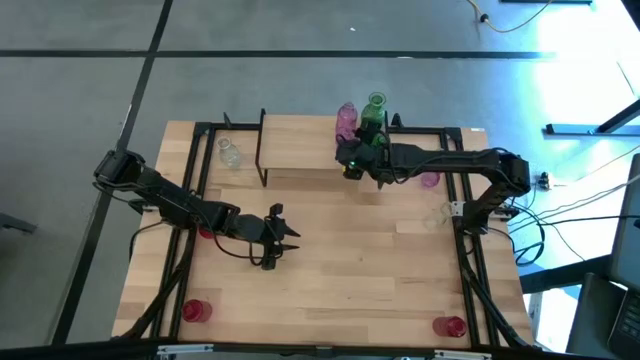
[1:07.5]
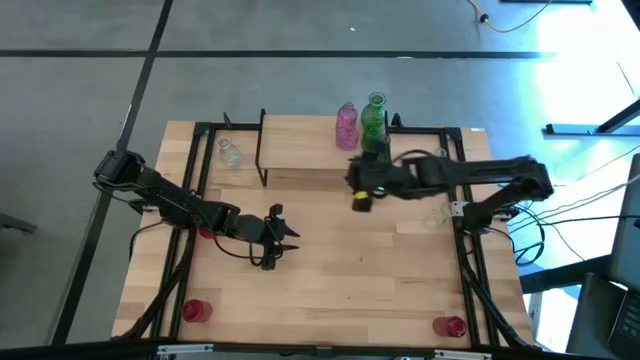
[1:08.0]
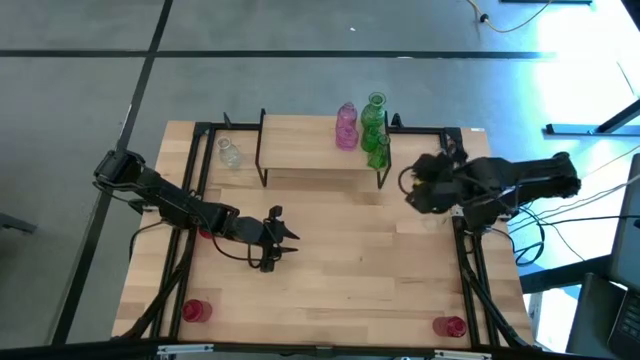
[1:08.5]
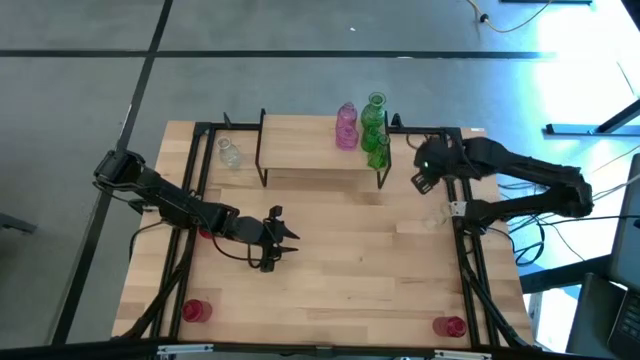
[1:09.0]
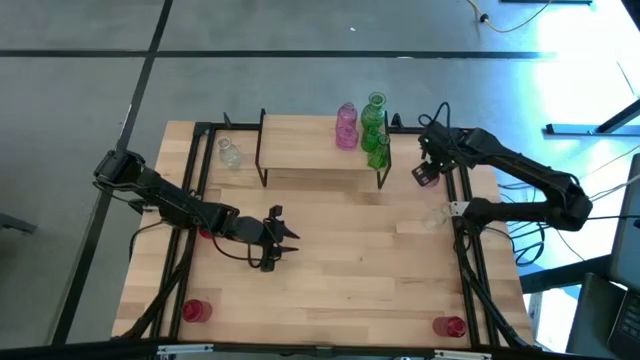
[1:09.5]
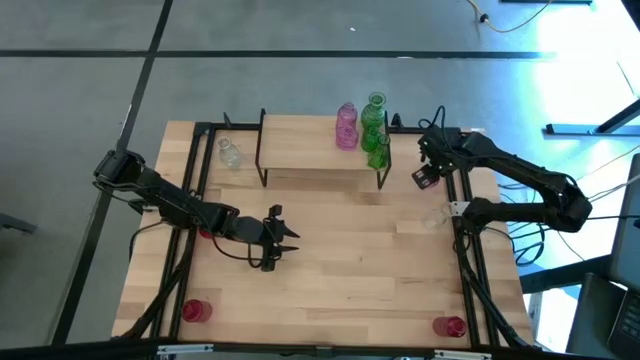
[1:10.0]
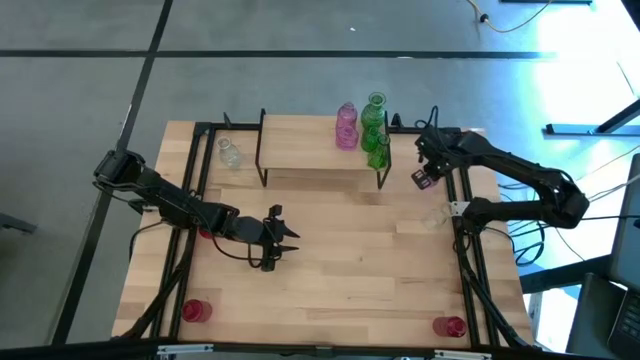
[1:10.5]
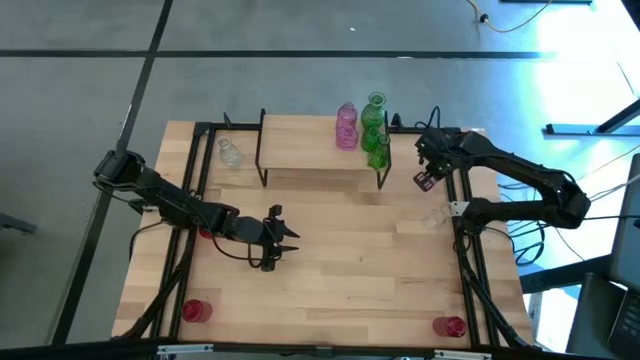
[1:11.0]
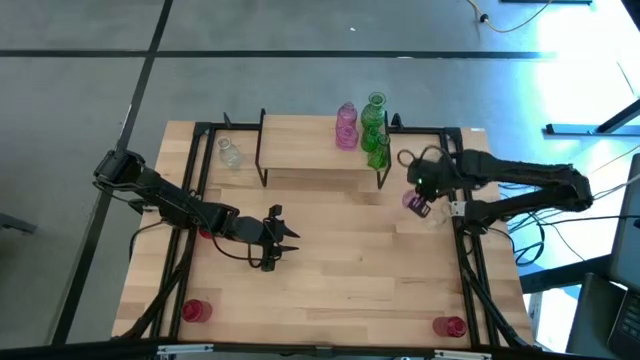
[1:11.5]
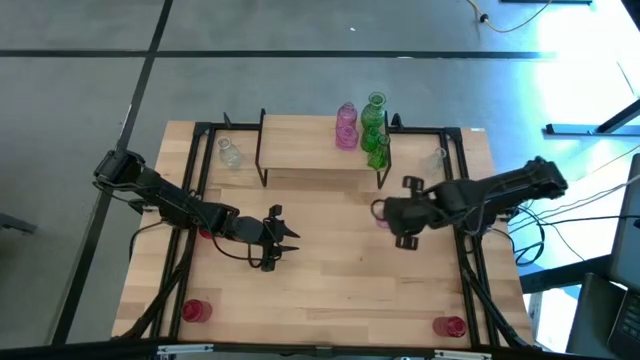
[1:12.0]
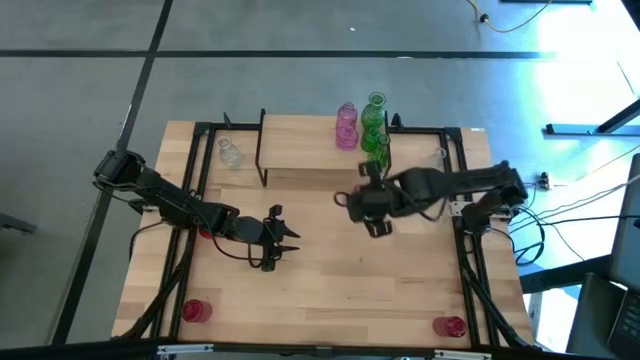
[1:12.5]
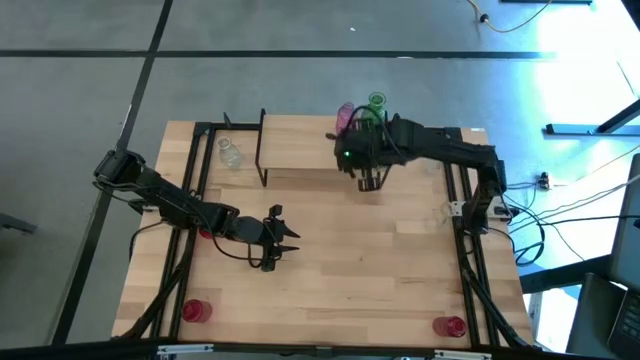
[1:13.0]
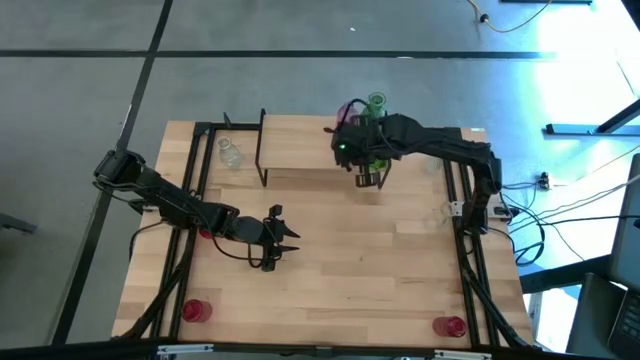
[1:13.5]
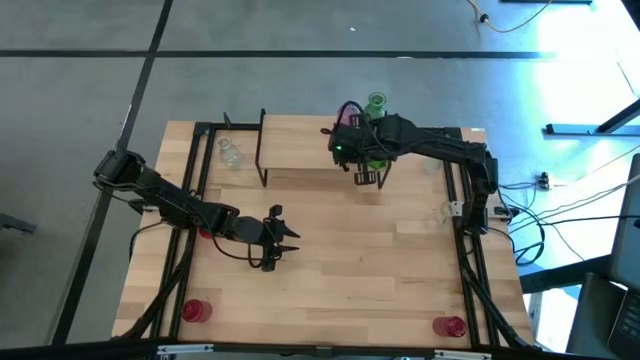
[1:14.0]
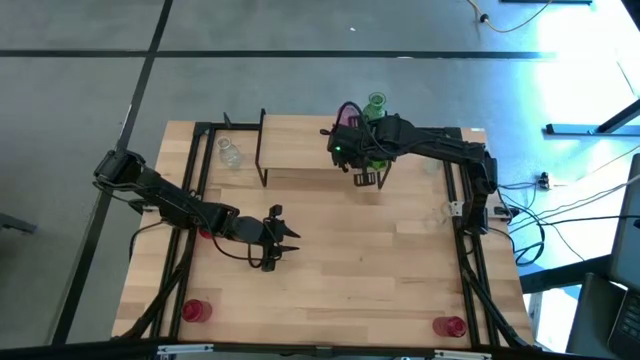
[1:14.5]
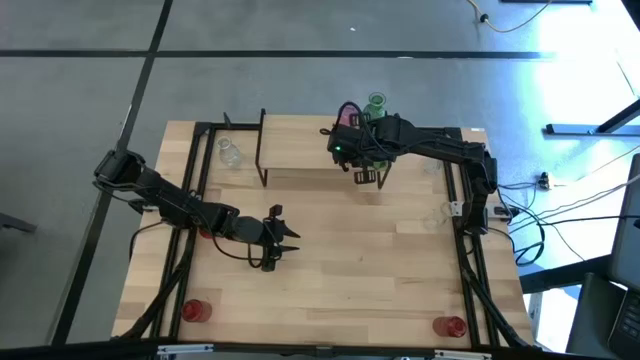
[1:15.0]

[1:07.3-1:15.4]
Task: sort vases onto shelf
Put the pink vase on the shelf aligned with the other pink vases

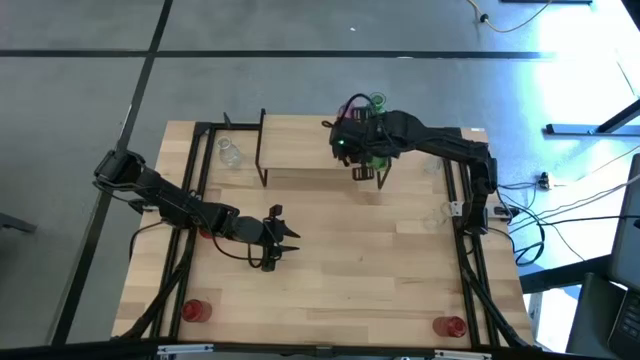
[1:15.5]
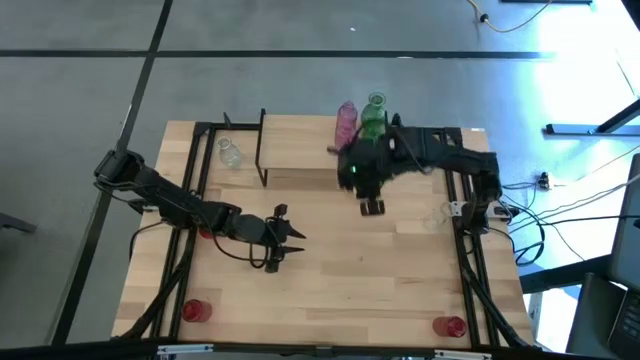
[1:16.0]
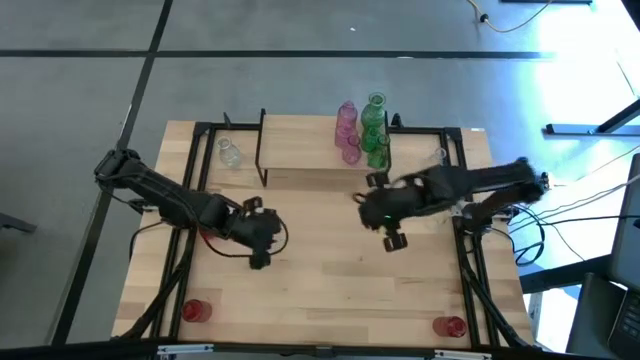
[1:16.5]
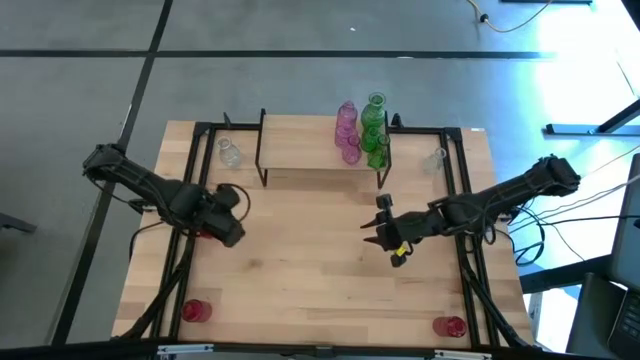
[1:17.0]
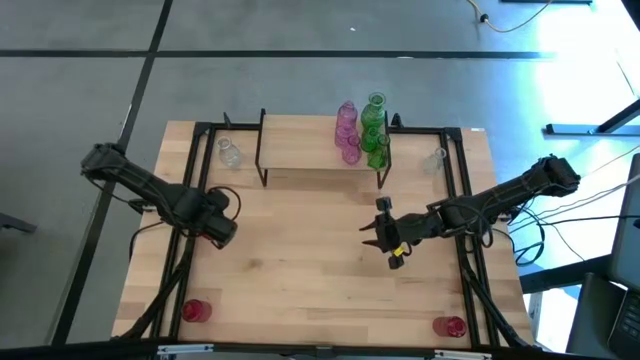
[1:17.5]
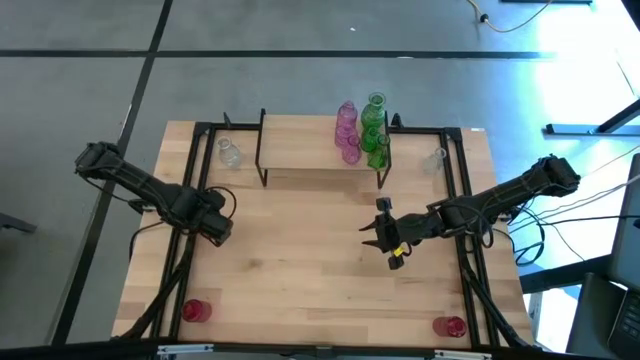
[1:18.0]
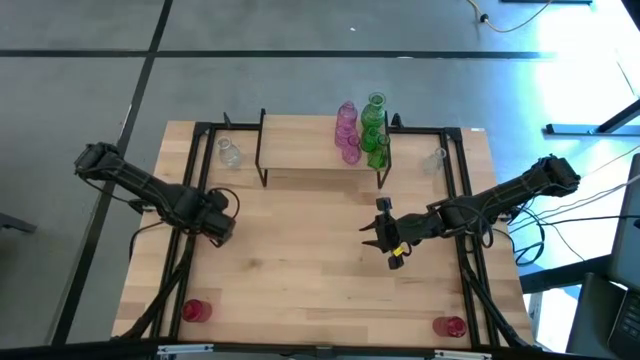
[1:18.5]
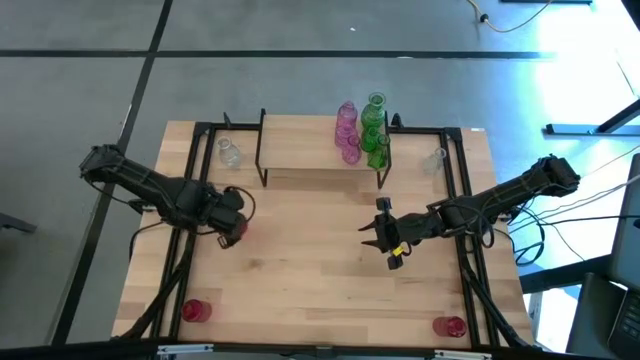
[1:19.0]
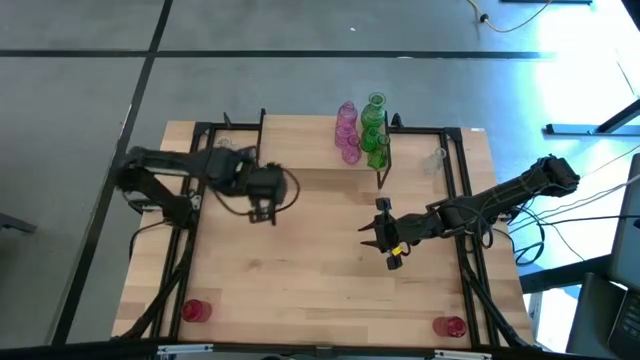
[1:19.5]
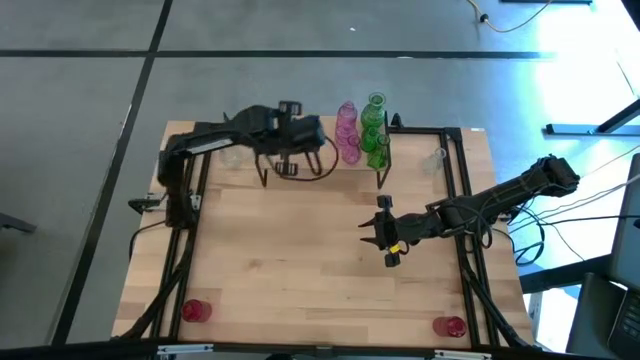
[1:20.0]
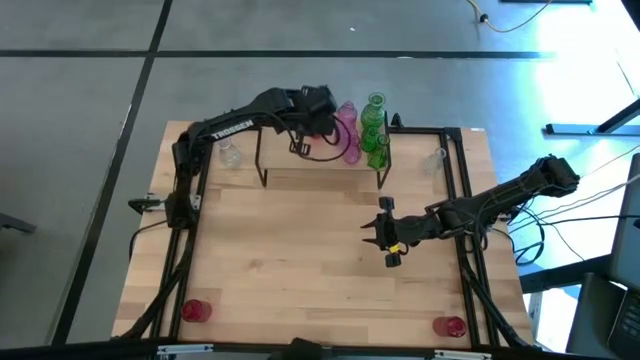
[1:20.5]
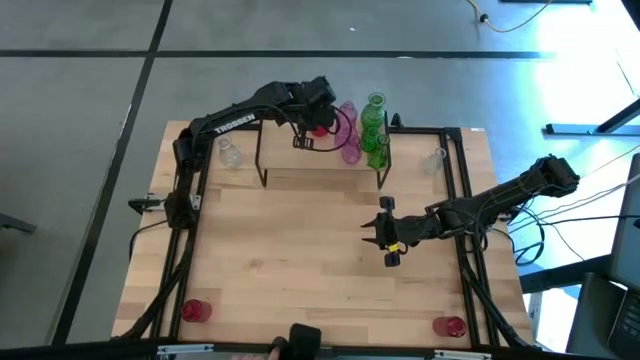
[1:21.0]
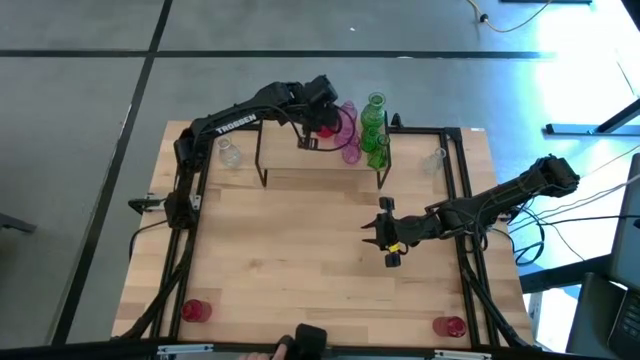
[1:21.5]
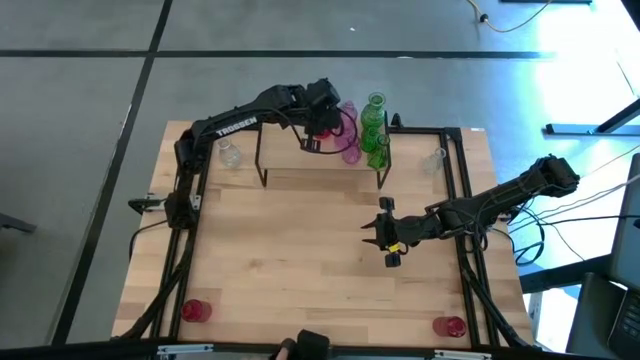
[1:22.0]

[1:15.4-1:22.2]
Put the top red vase on the shelf

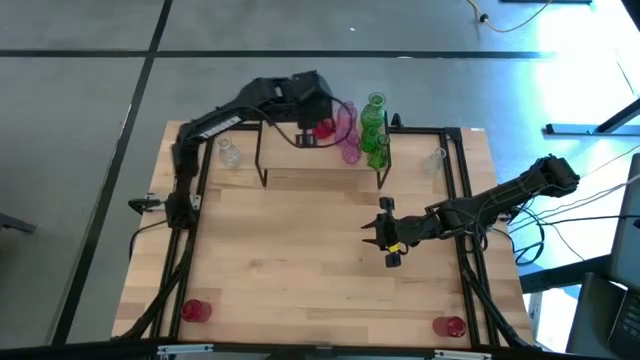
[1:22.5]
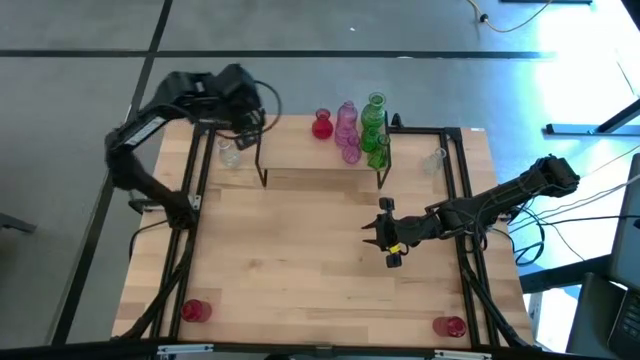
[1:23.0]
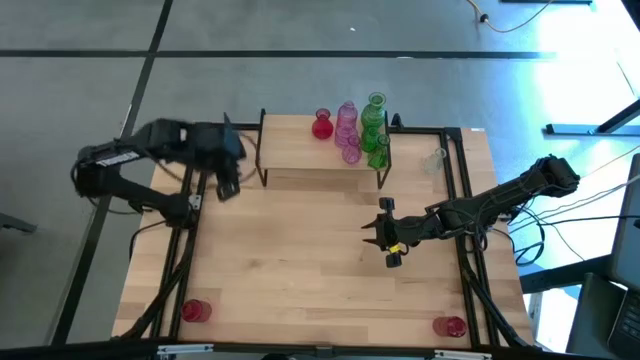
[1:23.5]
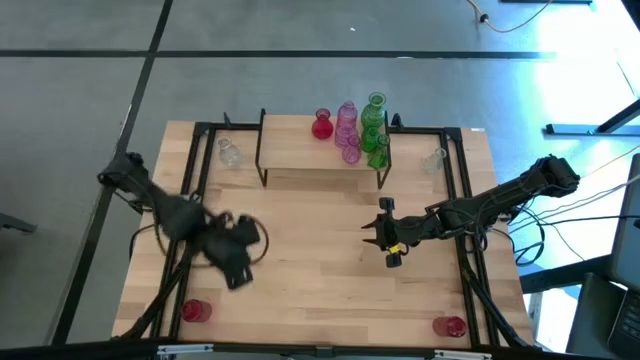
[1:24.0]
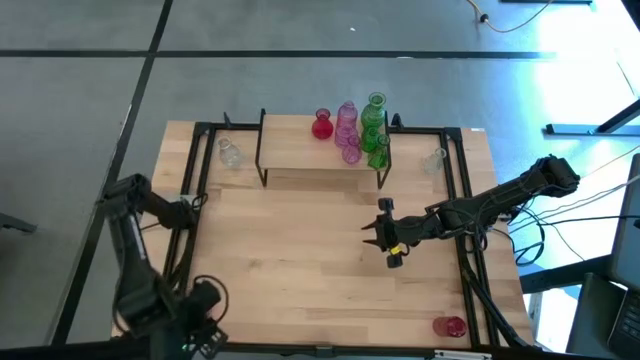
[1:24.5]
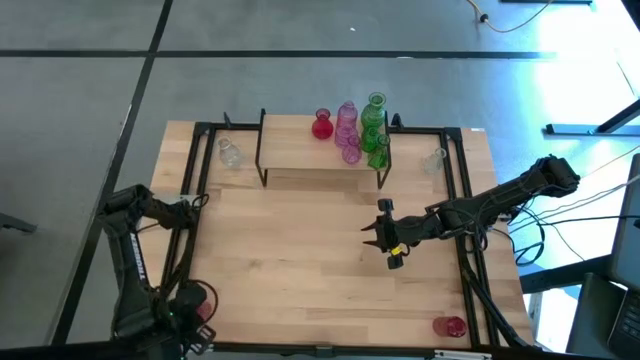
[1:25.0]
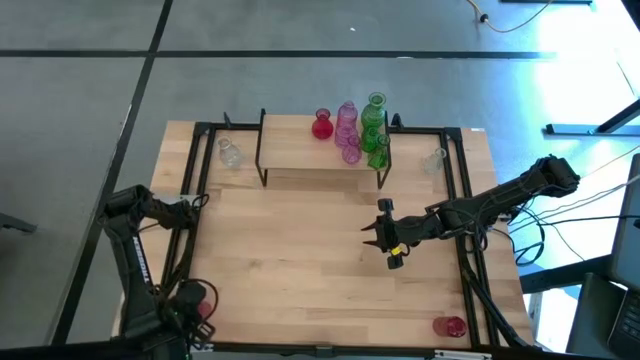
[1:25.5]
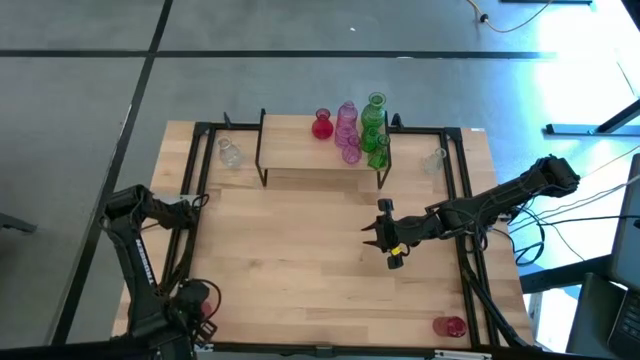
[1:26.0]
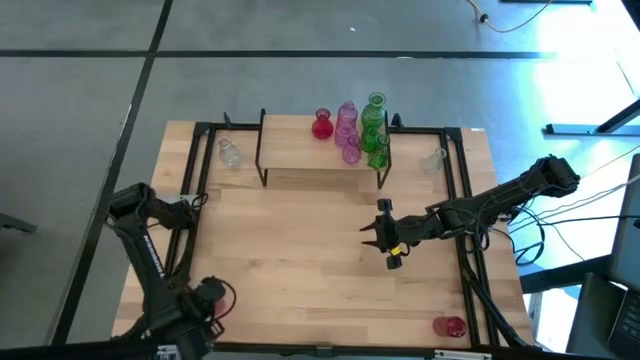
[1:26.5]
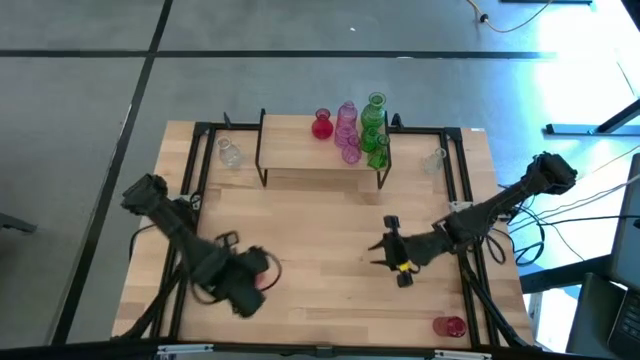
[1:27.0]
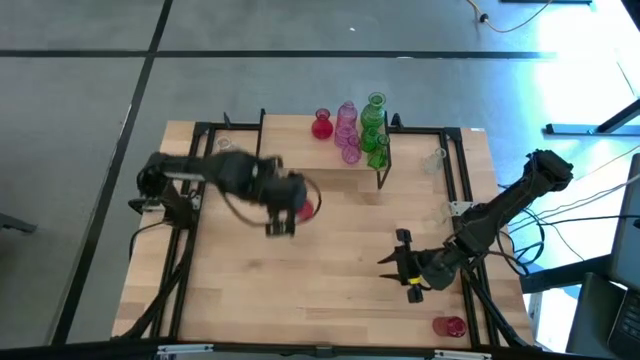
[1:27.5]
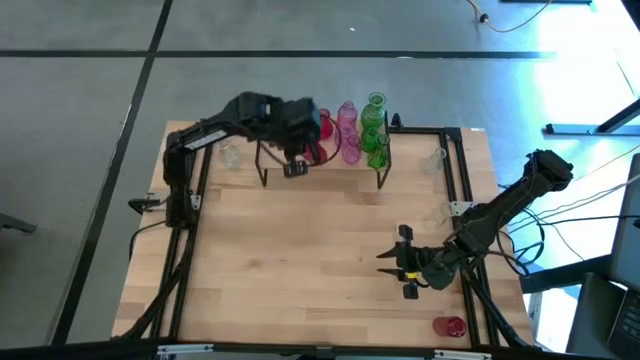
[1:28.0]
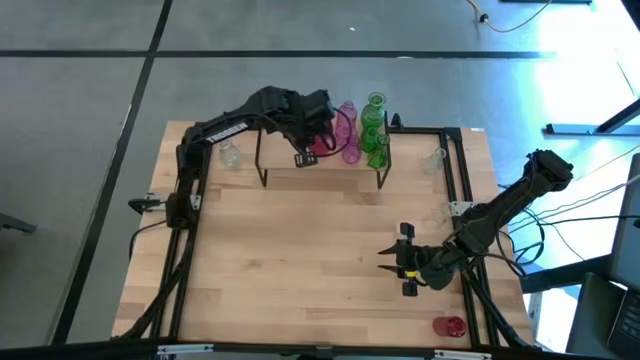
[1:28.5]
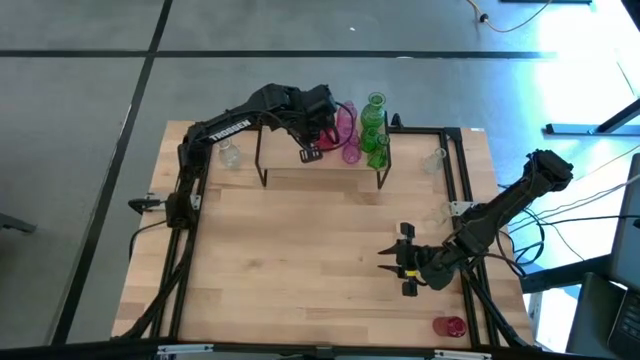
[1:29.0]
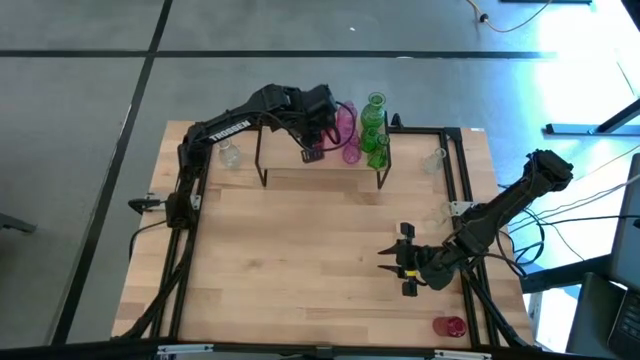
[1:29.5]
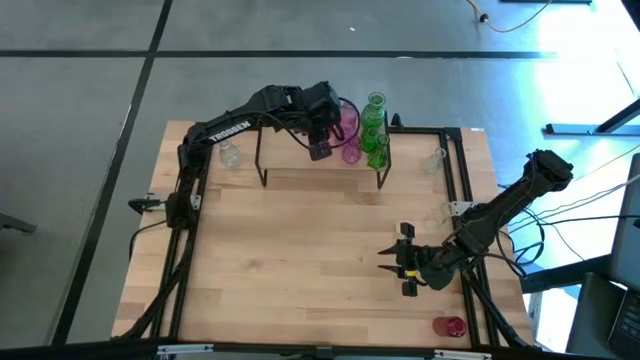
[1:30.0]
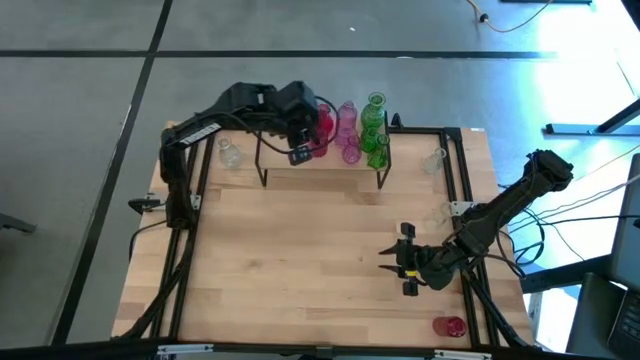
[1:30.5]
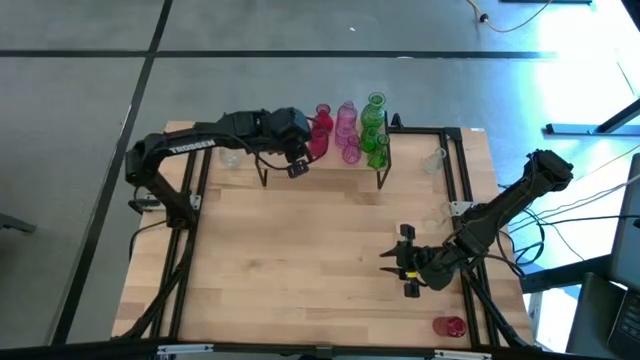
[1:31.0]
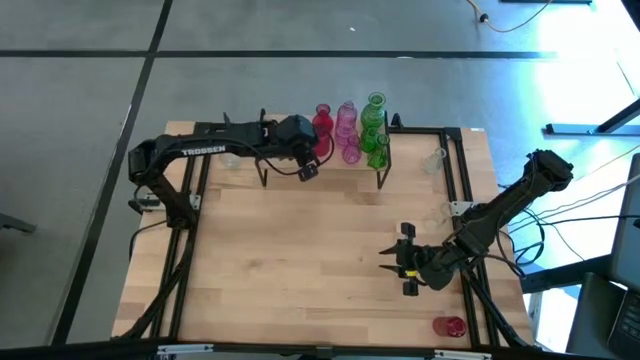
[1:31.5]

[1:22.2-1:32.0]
Put the left red vase on the shelf aligned with the other red vase
